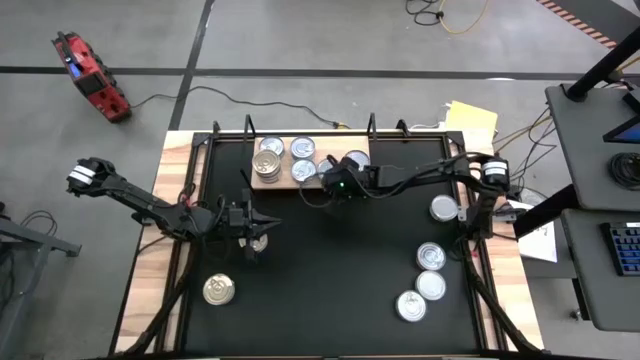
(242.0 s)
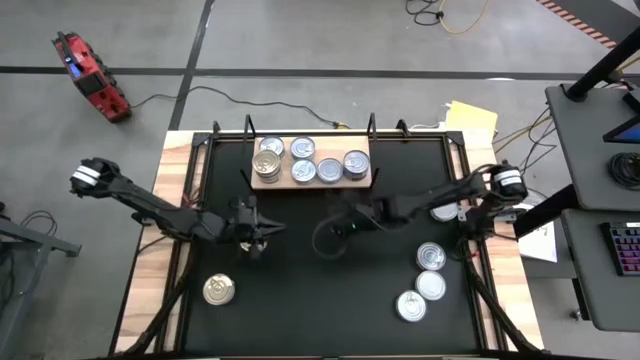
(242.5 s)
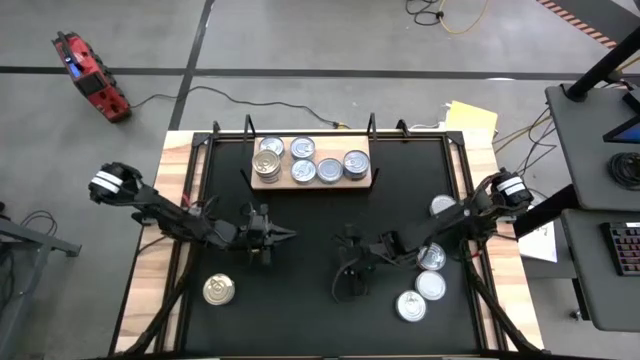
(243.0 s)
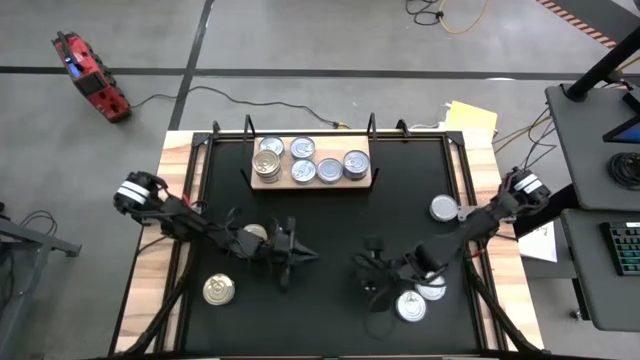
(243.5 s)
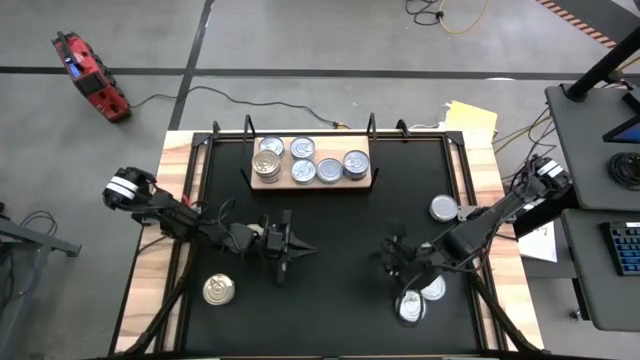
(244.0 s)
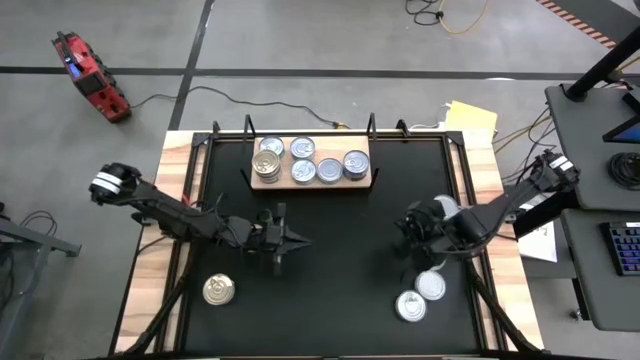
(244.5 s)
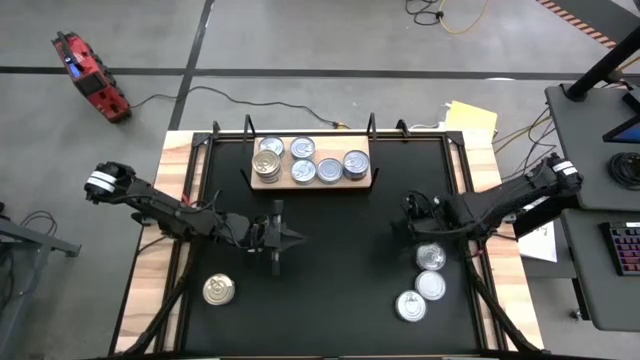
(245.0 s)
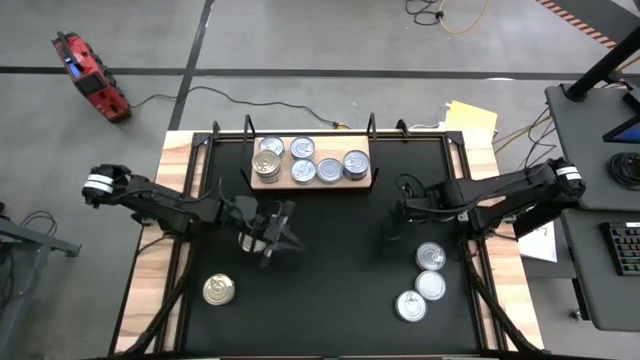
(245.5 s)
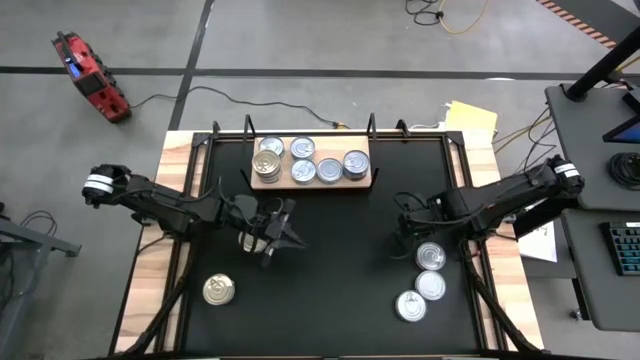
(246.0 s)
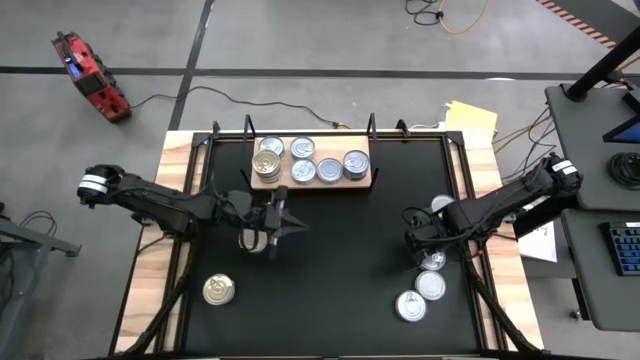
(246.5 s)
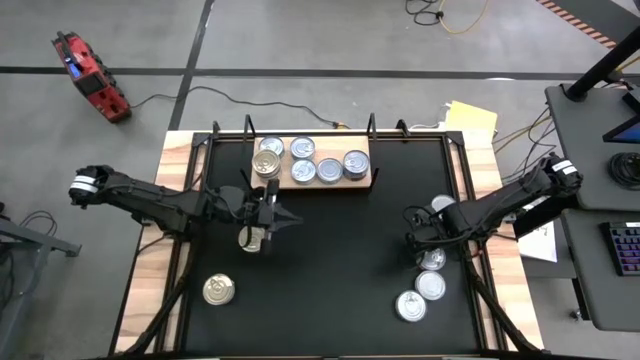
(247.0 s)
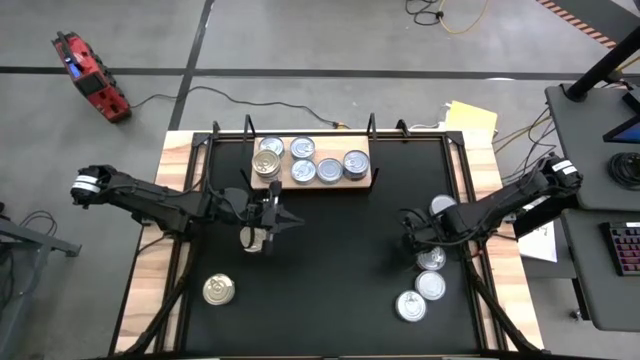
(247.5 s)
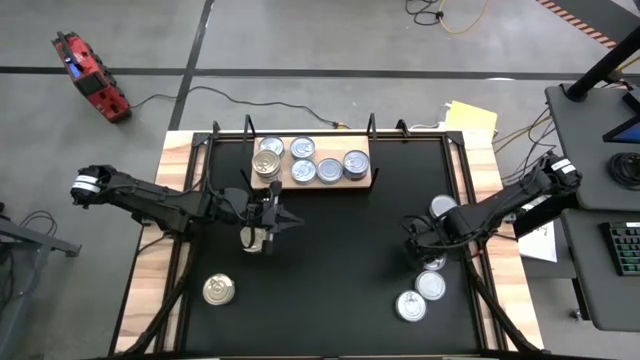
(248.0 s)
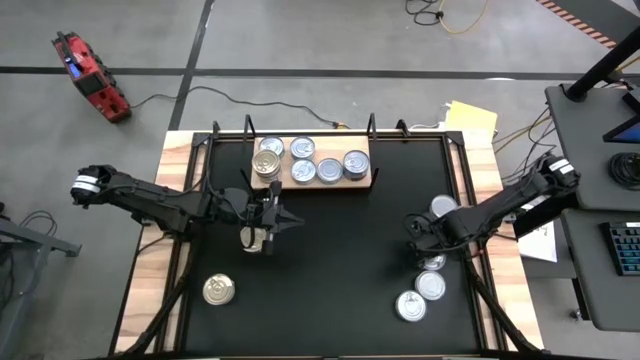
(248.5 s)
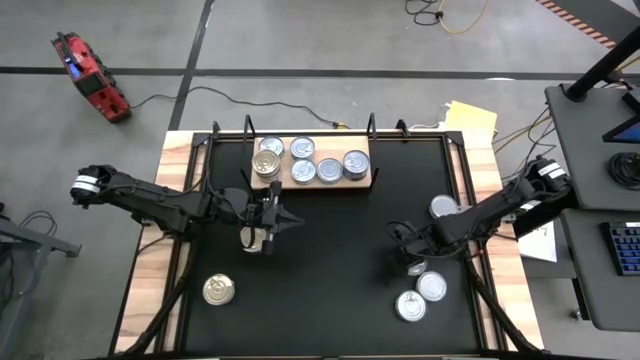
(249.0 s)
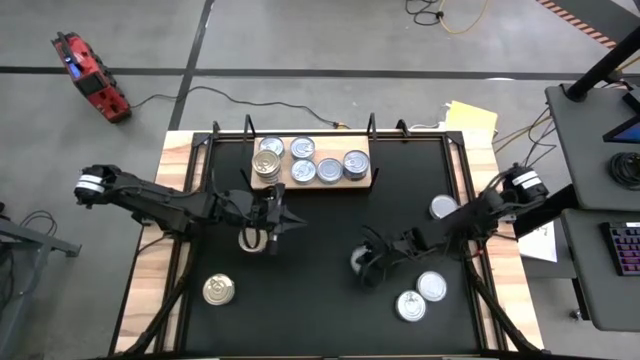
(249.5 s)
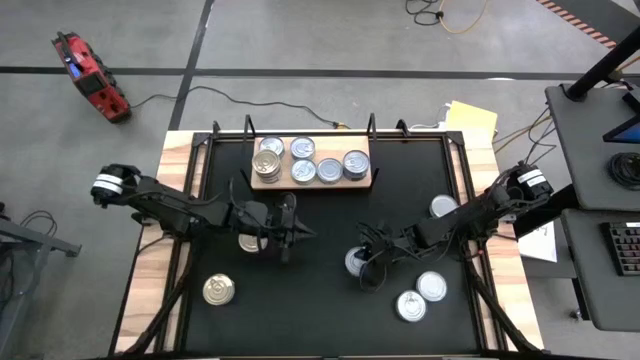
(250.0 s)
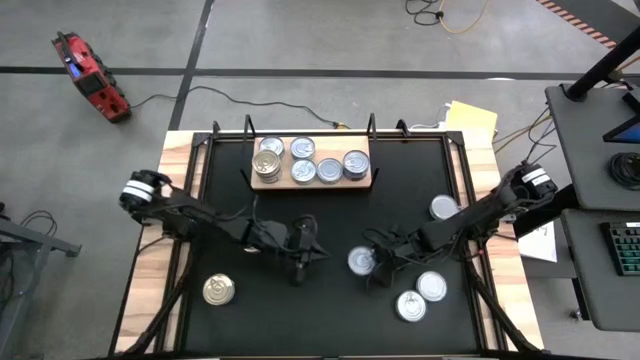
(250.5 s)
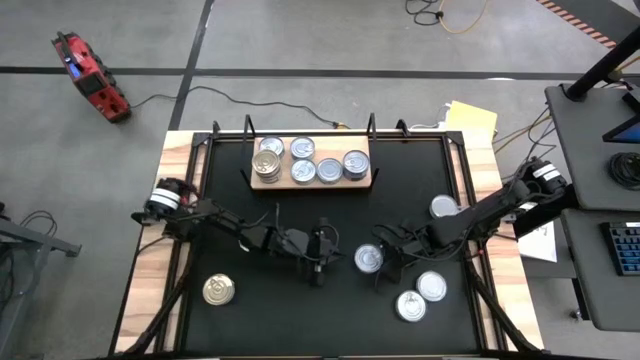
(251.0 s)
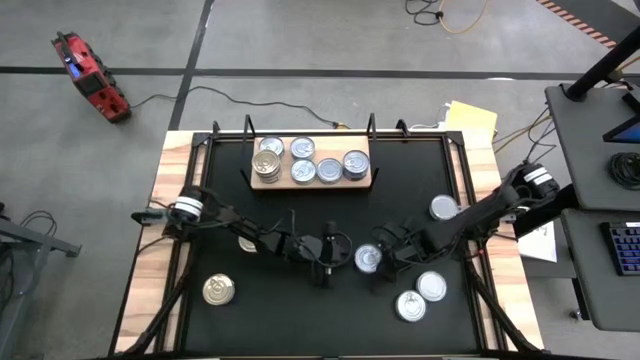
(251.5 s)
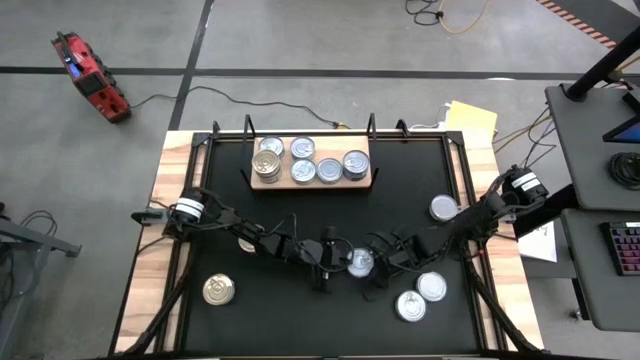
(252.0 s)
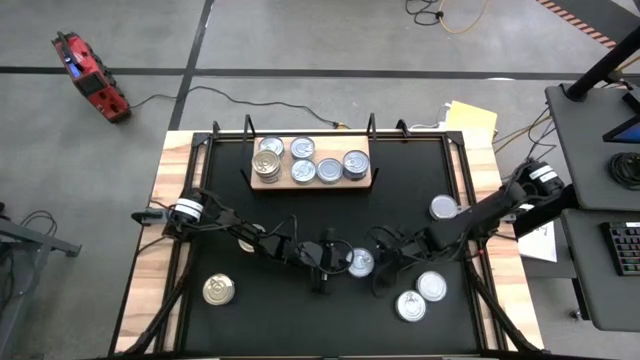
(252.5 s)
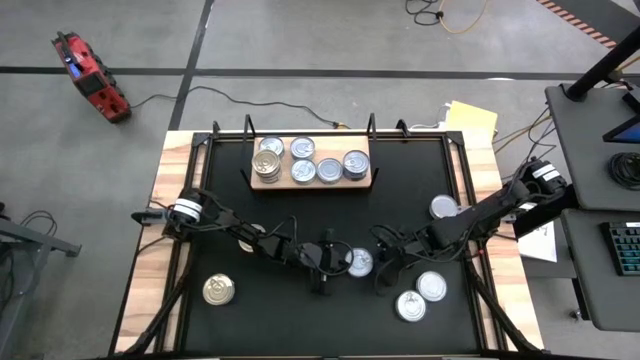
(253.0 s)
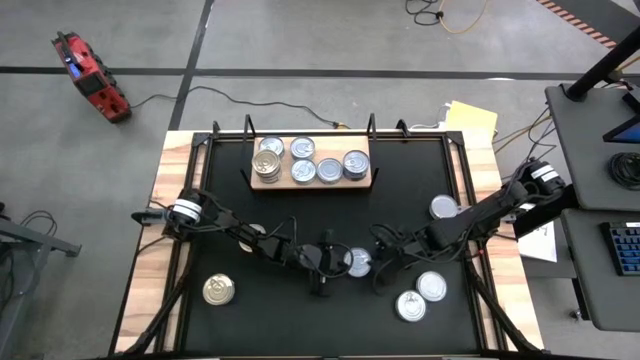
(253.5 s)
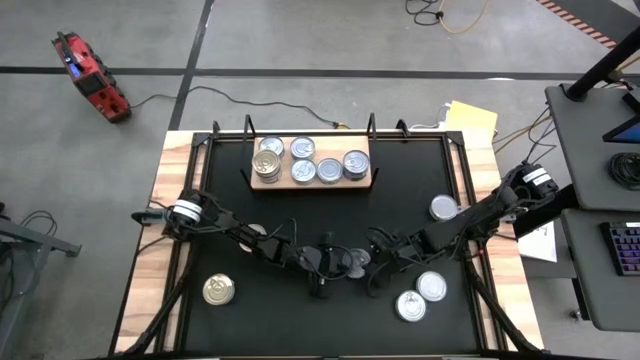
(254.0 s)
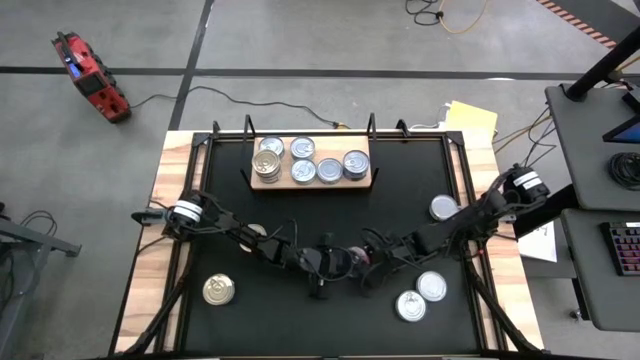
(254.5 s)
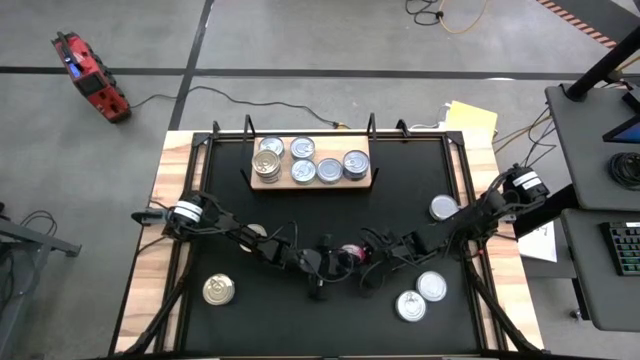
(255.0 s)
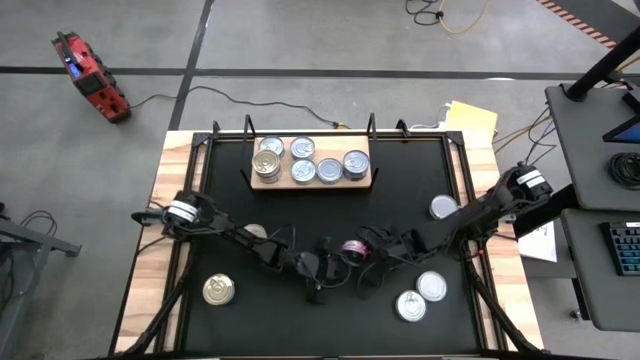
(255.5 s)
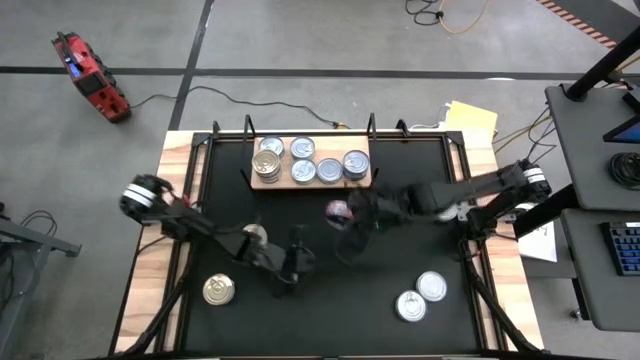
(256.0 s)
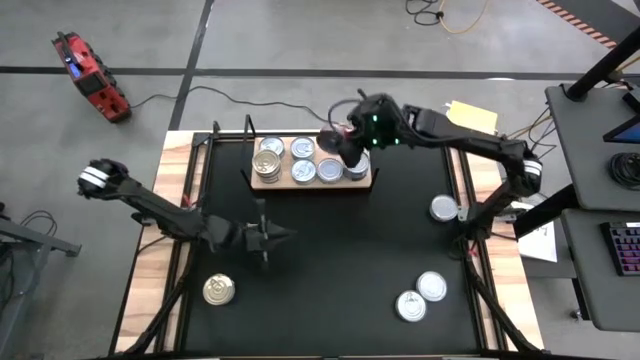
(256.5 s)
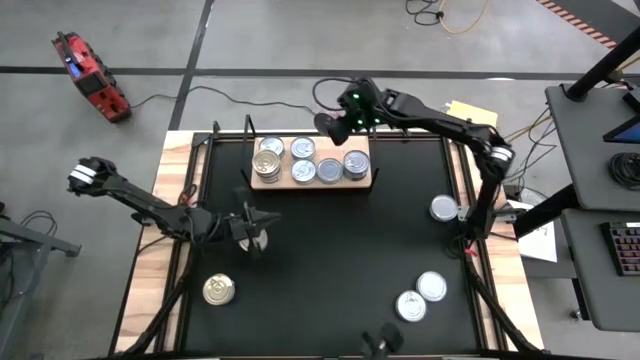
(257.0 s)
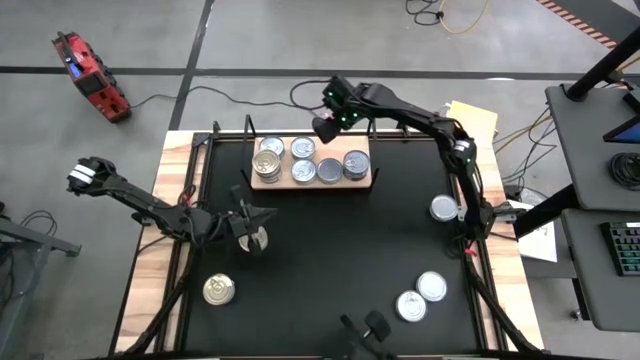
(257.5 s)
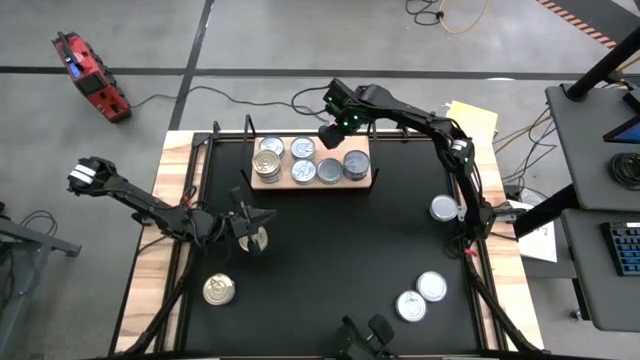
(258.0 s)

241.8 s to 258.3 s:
Task: Stack canned seafood by type on shelf
Put the red tuna can on the shelf

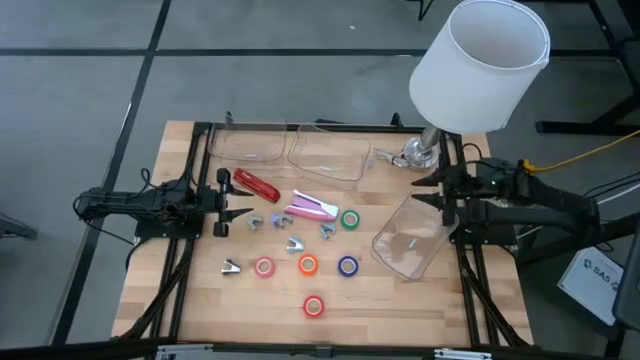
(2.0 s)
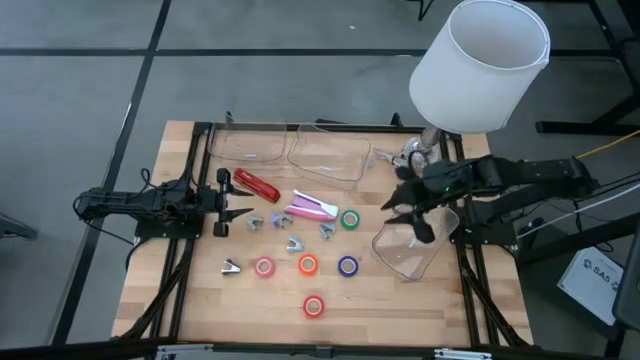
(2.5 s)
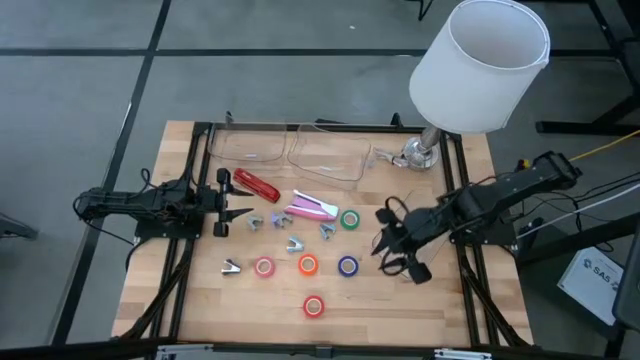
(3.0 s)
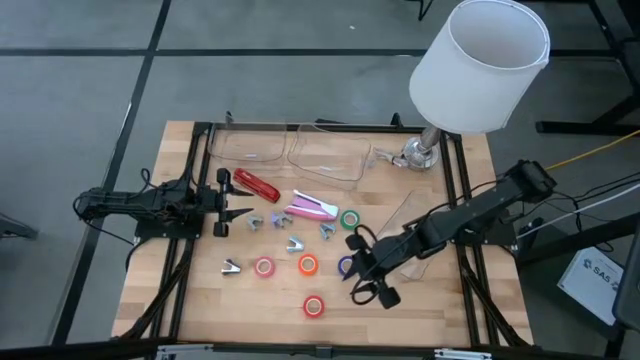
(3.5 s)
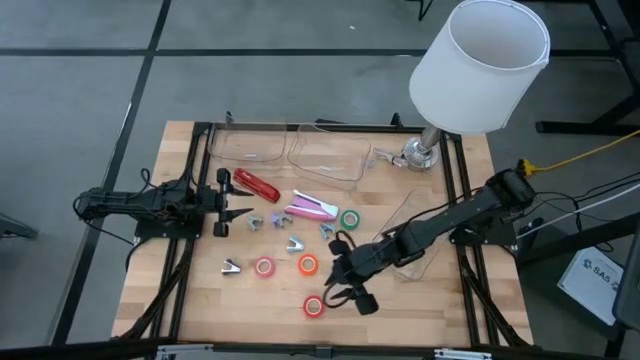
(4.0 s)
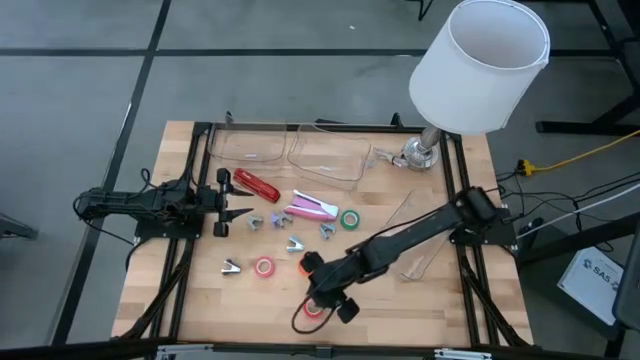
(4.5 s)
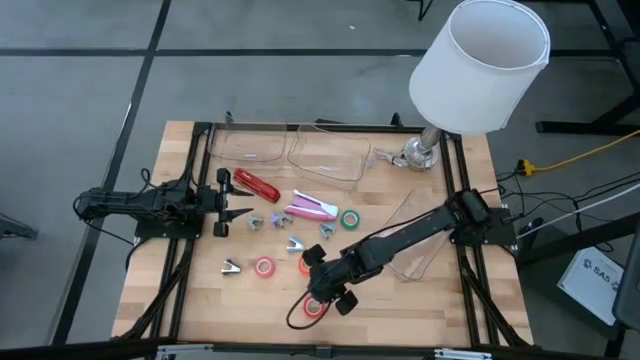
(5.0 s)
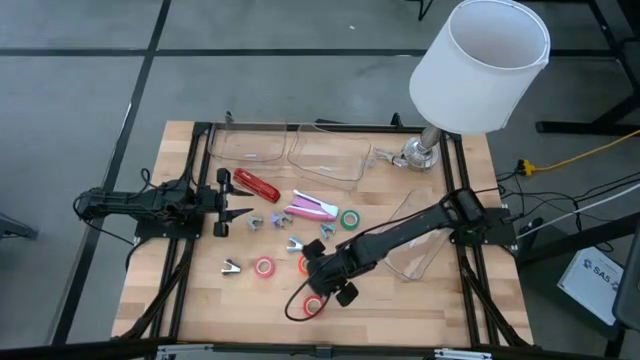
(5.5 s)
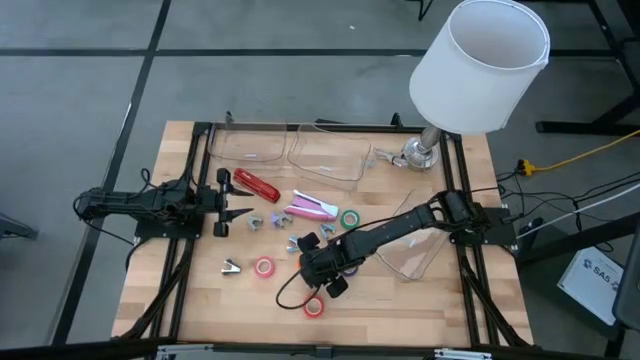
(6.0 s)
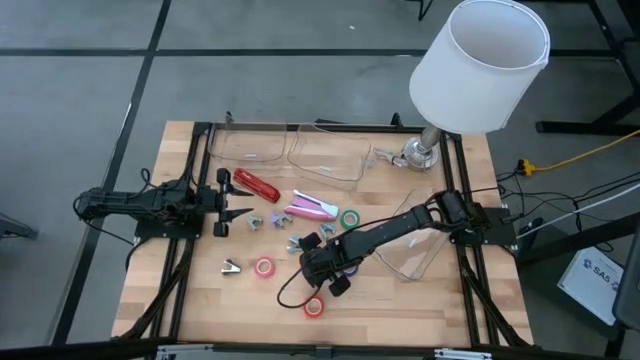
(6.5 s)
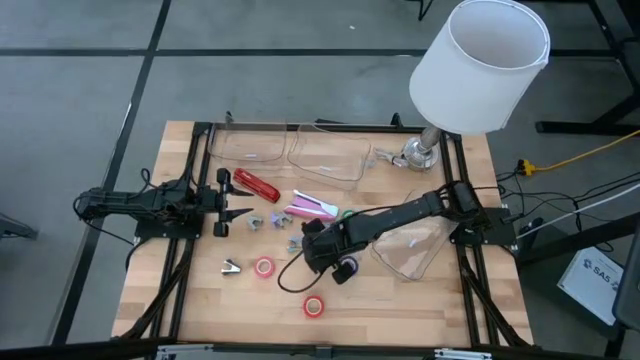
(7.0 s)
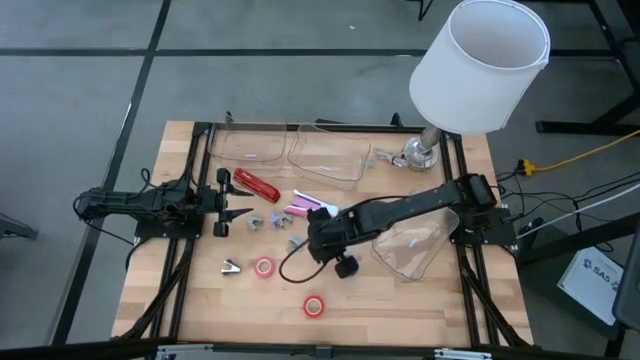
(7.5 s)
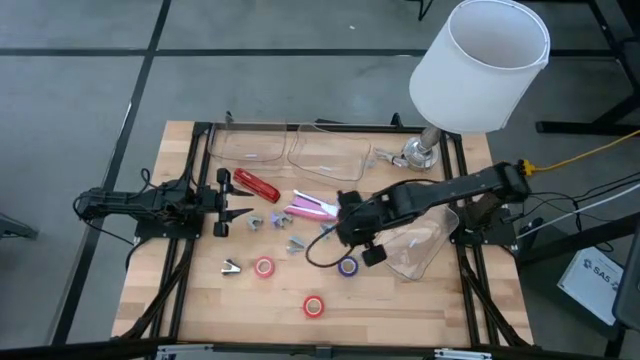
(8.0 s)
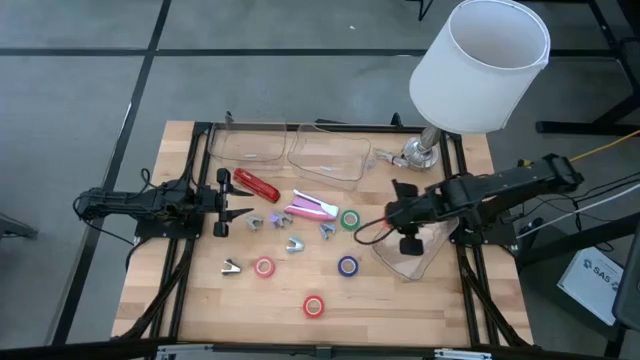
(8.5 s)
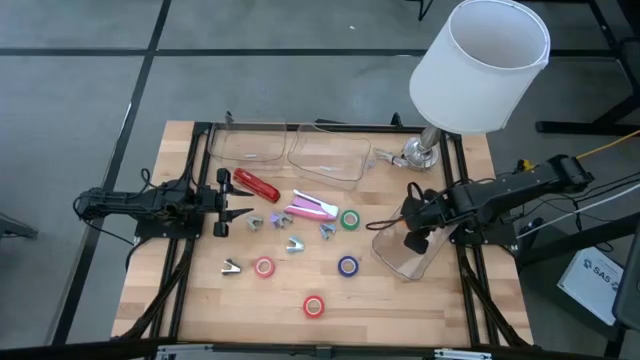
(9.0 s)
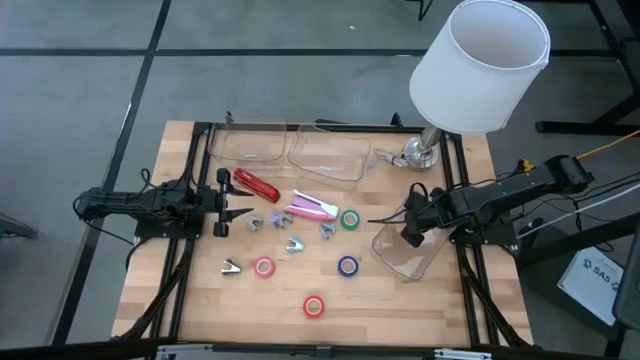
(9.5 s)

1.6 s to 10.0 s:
Task: Pick and place Stapler, Stapler remover, tape
Put the orange tape into the bottom transparent bin
